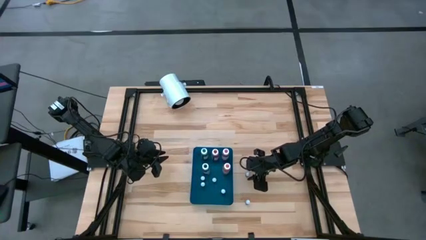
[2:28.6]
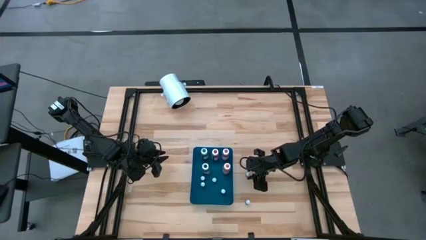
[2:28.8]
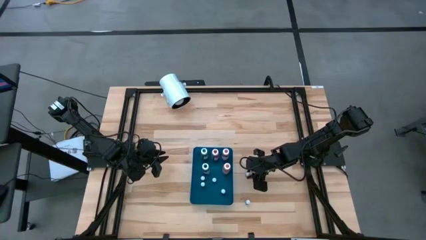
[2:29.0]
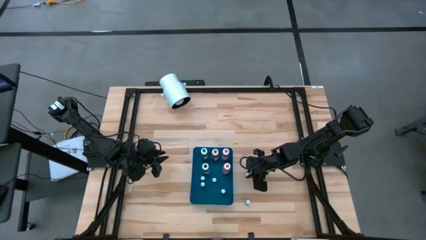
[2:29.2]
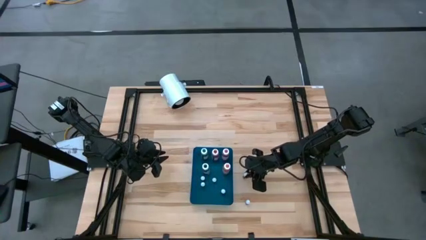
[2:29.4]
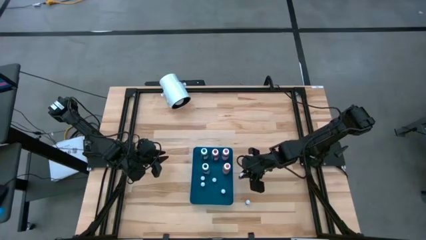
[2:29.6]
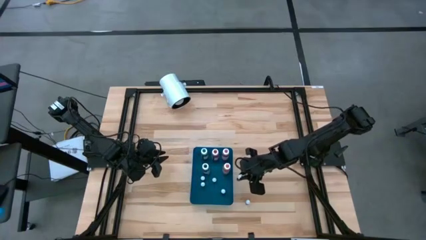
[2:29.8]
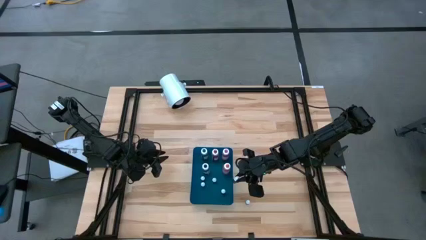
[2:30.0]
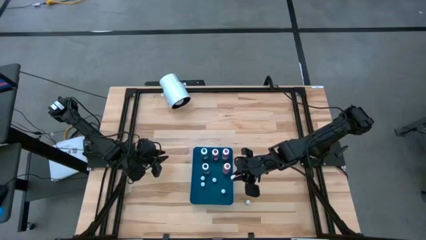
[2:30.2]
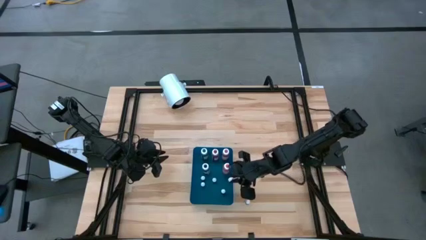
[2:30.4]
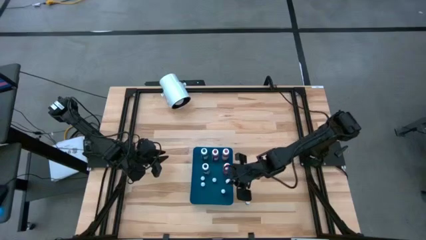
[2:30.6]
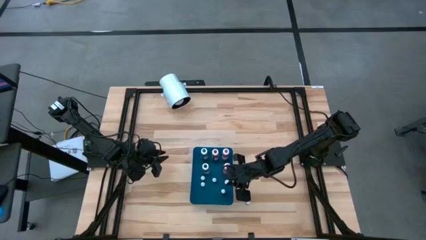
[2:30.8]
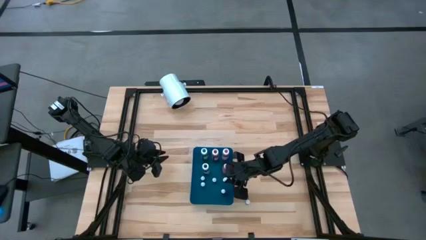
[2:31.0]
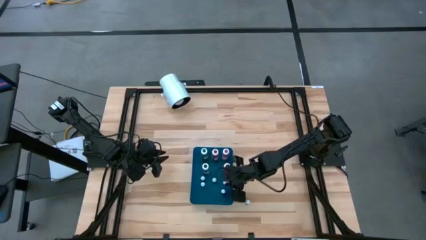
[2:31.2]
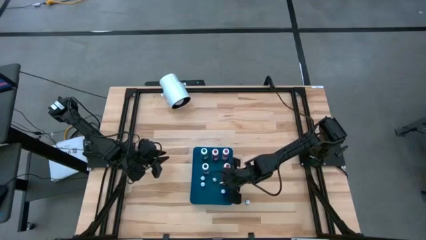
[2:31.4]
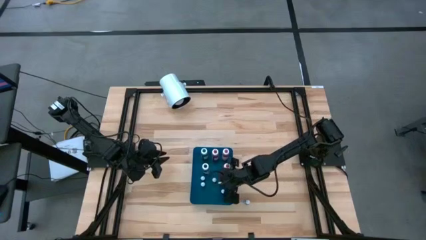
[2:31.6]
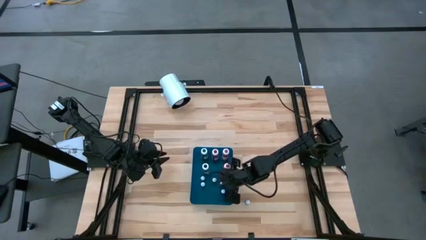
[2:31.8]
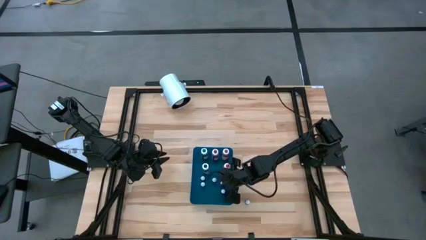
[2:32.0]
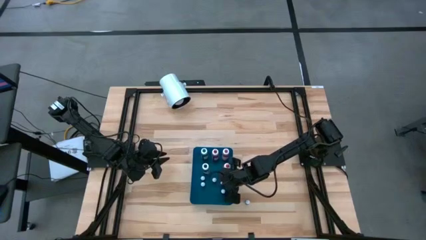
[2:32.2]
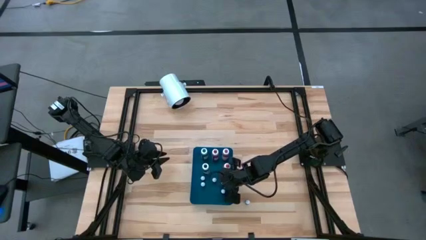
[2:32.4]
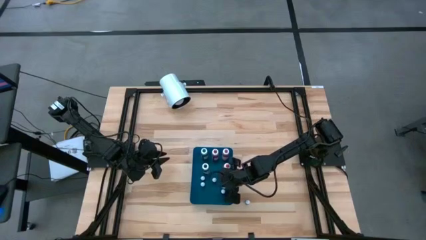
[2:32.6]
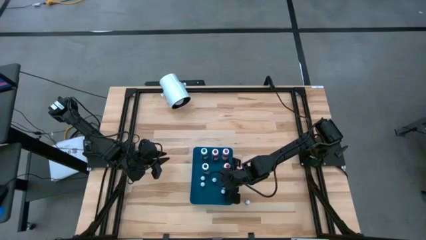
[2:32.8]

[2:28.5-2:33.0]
Task: Pick & Place food coloring
Put the small brown food coloring bottle into the blue container

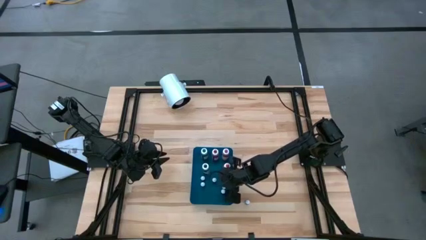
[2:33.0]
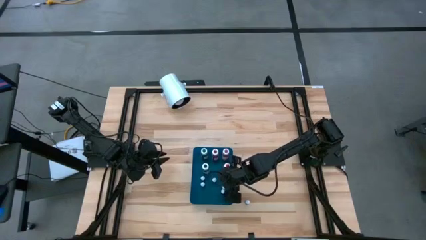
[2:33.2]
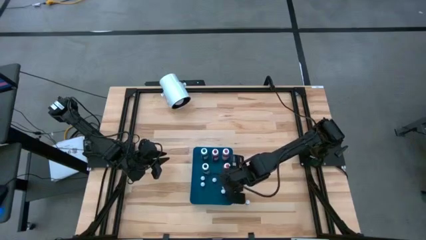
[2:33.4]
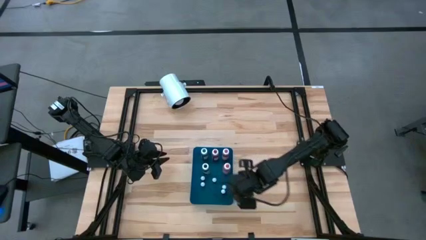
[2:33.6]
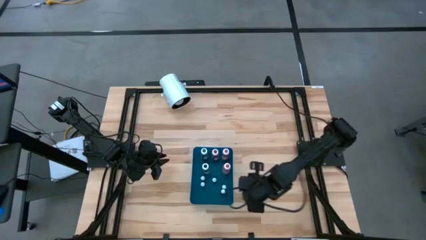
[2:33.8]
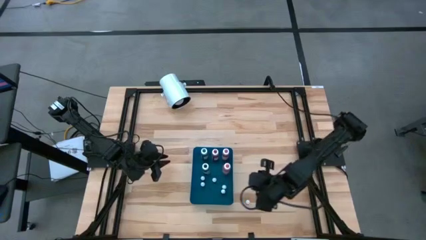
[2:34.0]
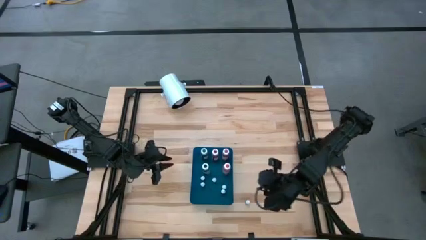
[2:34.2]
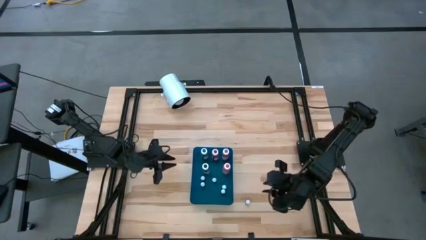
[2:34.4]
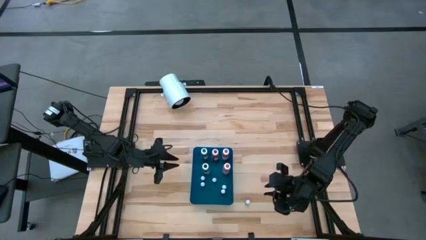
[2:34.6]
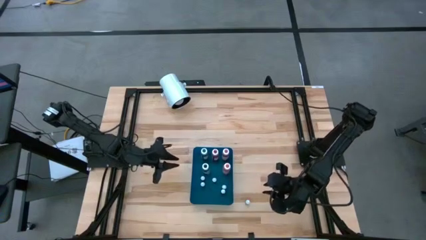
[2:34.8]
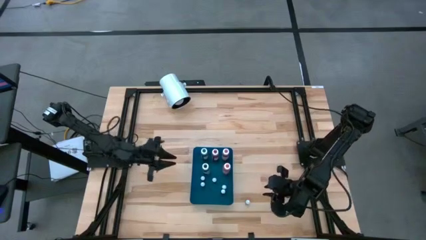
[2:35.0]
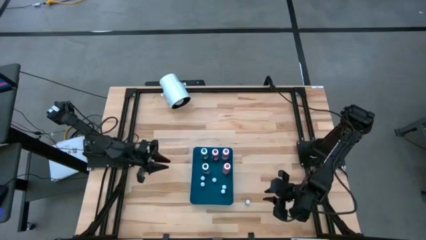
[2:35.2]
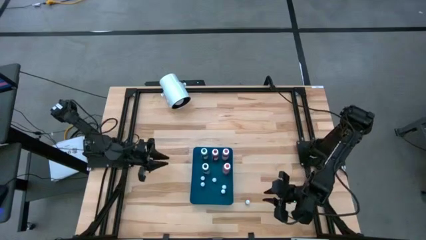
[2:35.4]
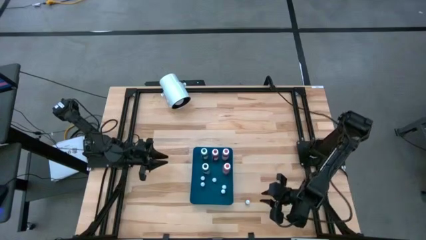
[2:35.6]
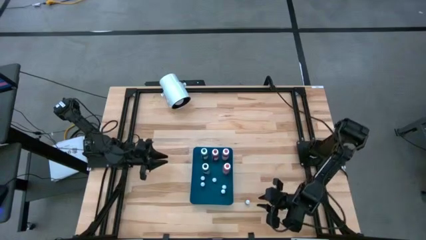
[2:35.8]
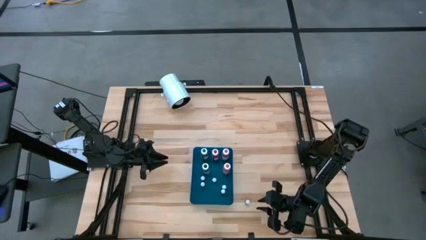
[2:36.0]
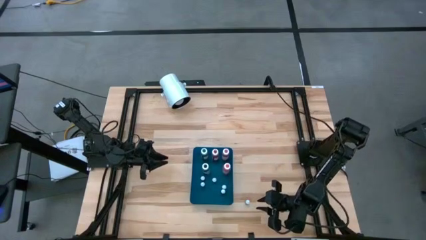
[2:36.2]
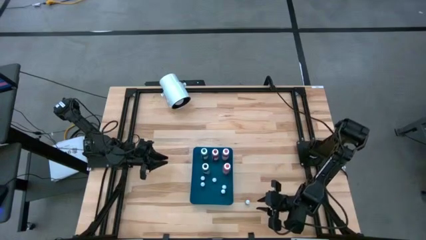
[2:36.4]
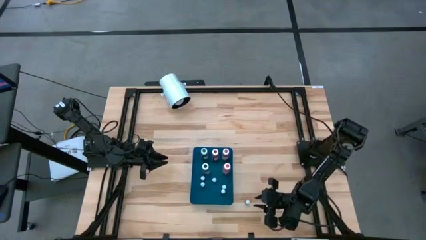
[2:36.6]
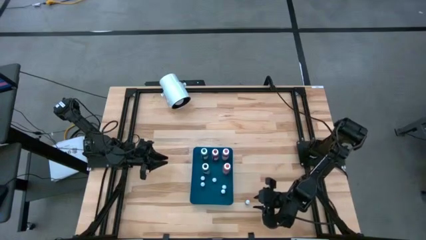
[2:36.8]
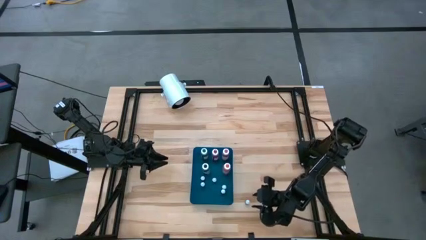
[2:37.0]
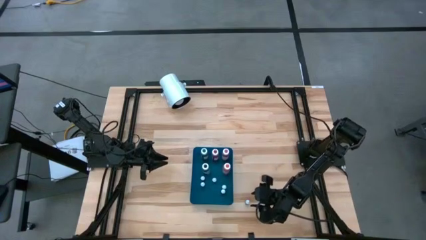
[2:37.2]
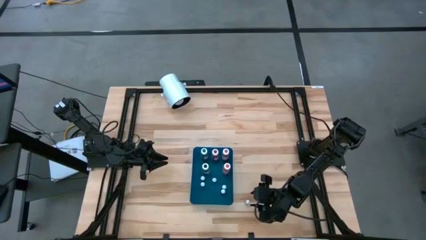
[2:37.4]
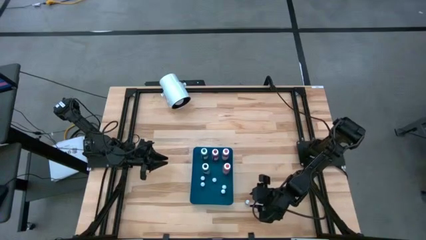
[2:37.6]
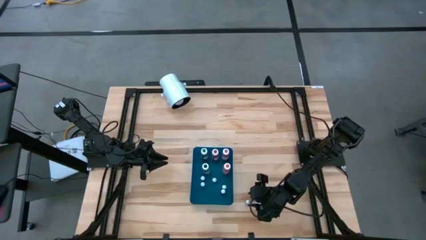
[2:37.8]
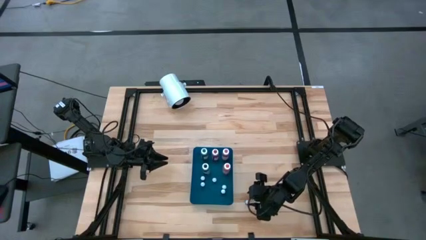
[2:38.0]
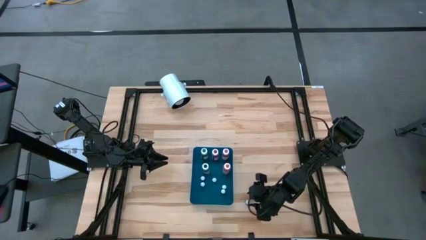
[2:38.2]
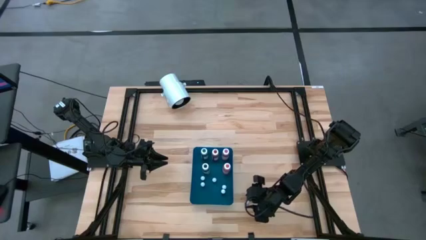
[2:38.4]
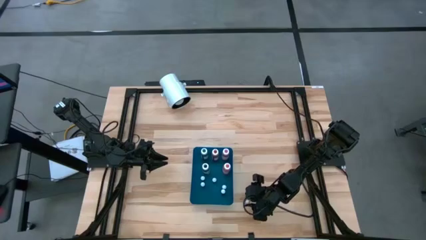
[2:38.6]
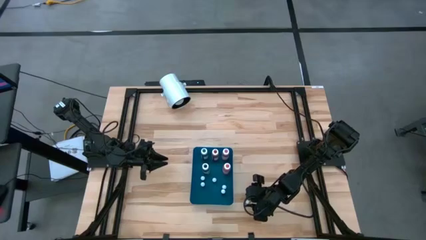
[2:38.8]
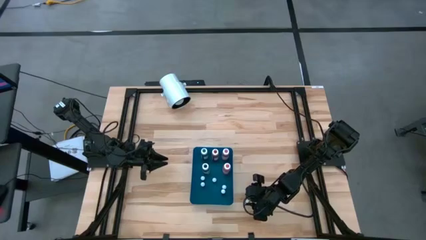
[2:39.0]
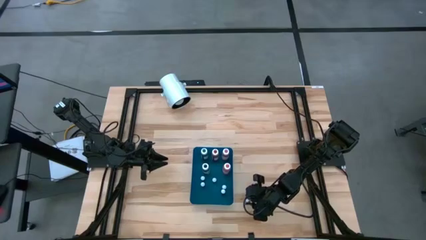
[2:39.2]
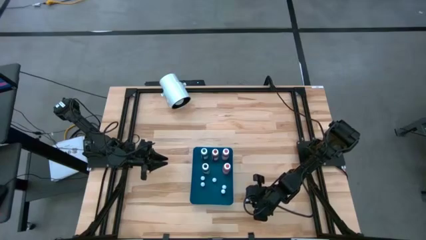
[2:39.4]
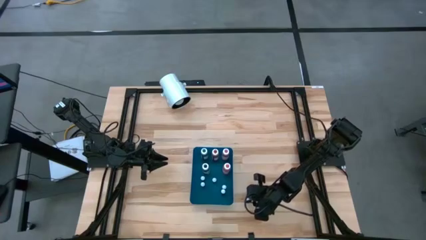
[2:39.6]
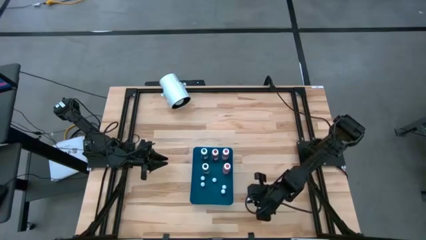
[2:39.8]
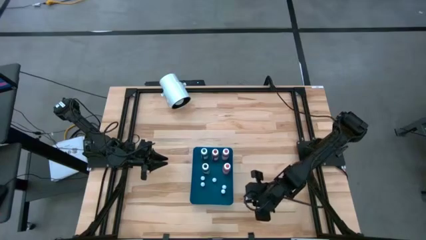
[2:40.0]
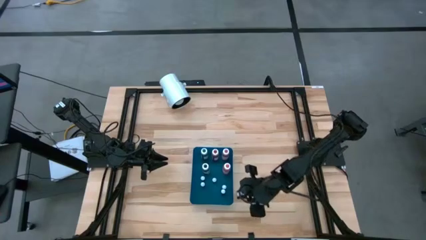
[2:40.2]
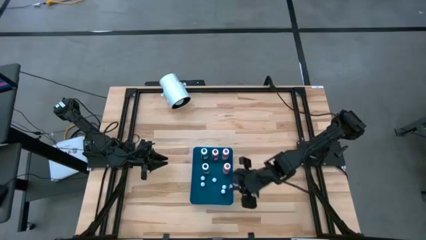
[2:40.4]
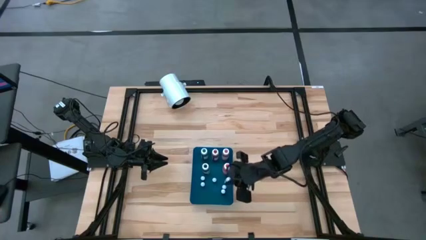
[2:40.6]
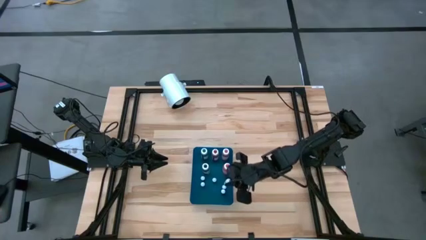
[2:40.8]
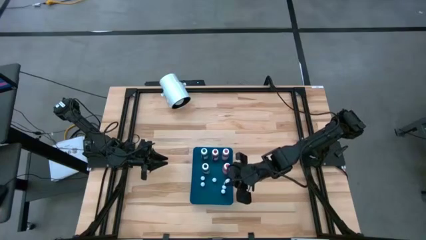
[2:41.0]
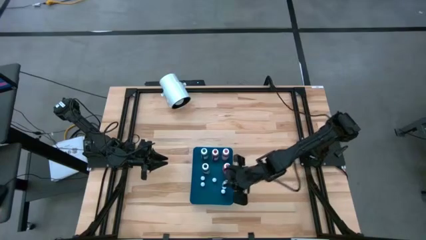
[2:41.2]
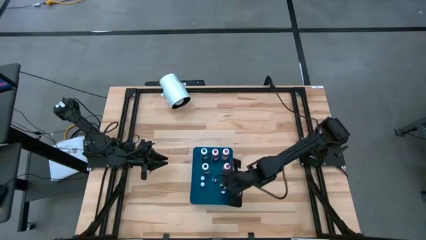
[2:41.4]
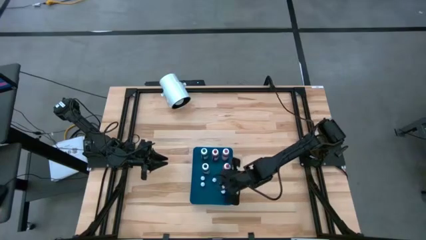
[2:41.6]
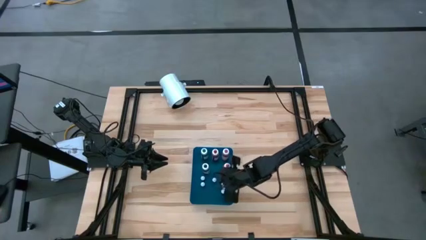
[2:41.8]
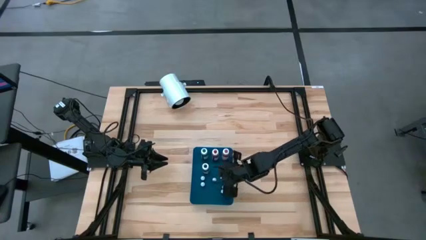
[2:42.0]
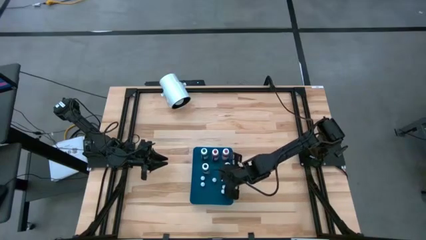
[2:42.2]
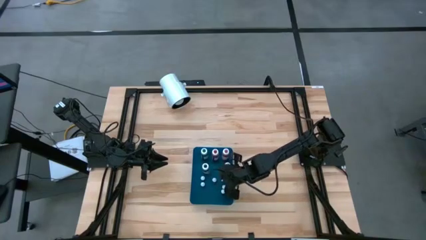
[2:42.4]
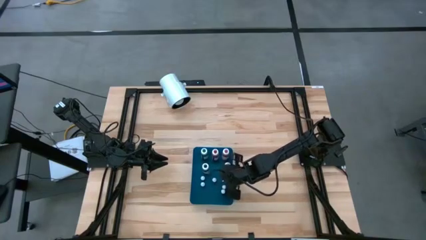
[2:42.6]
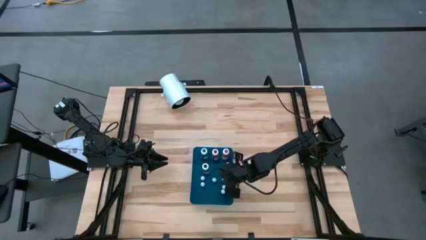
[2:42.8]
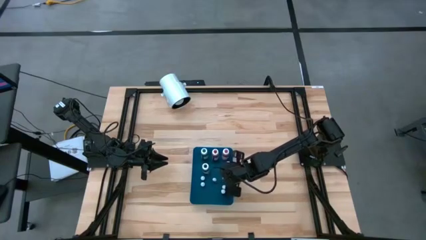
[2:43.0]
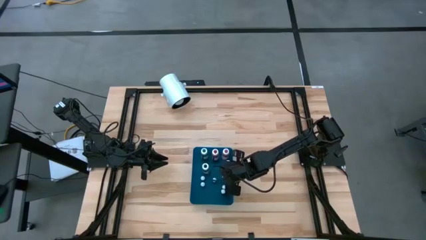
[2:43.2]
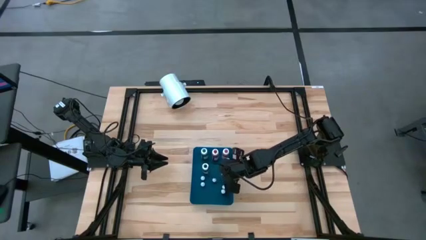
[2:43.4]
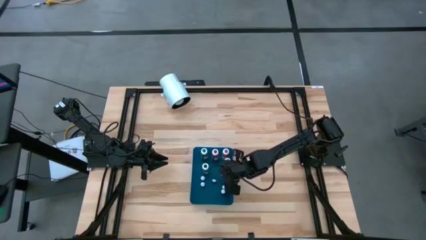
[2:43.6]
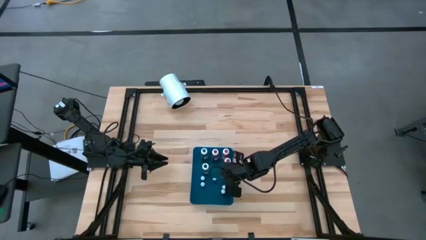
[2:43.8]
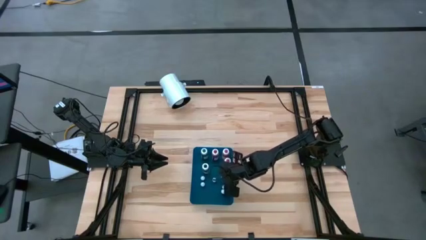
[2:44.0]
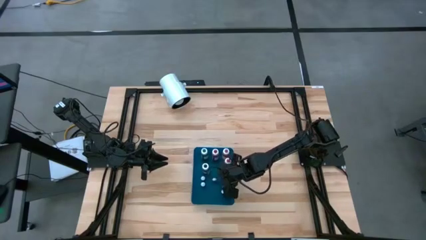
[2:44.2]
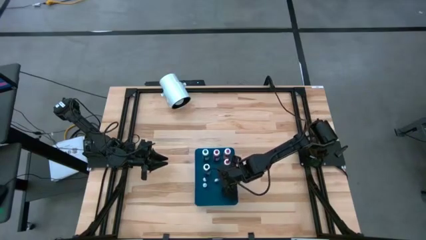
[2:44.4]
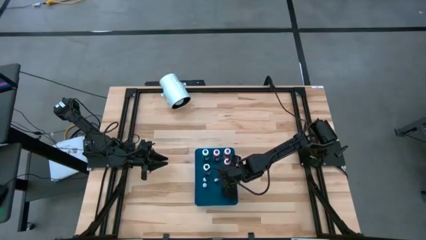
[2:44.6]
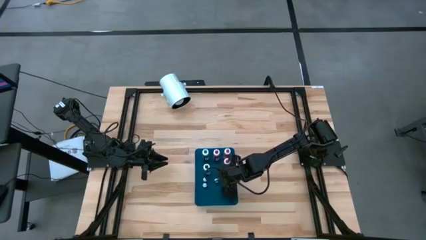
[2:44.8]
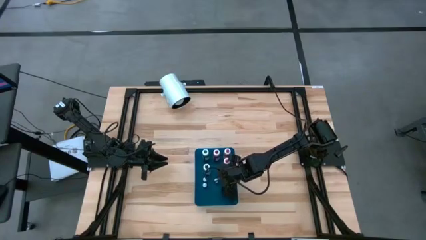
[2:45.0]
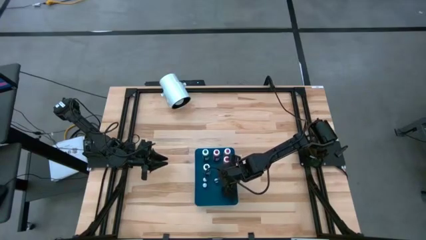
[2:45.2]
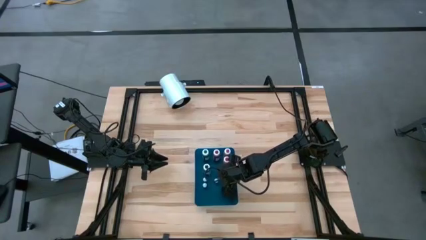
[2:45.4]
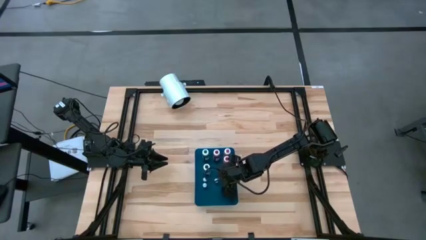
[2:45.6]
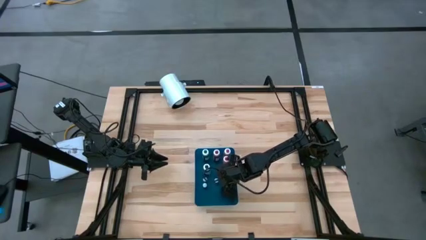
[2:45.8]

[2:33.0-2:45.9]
Put the small green food coloring bottle into the blue container
